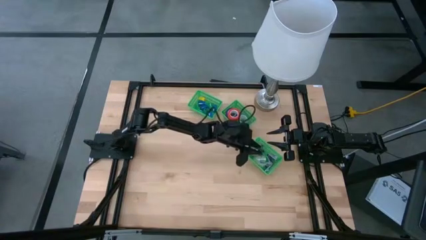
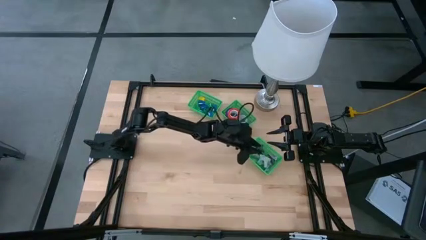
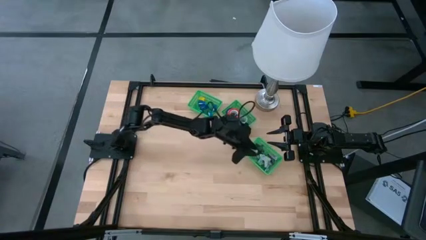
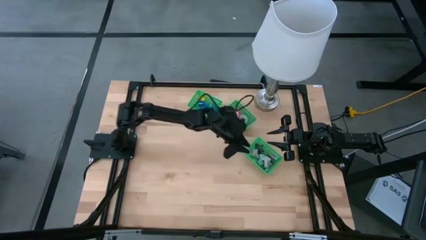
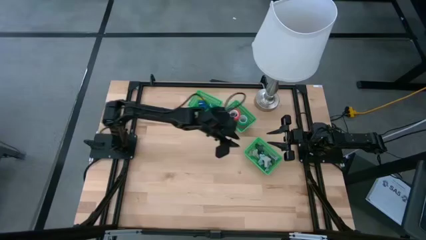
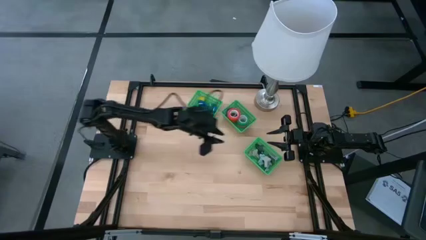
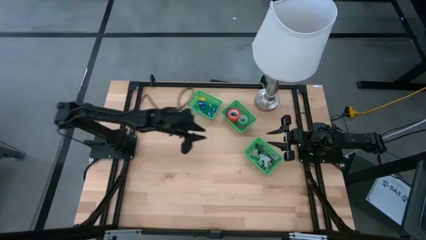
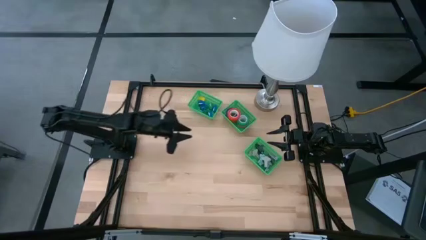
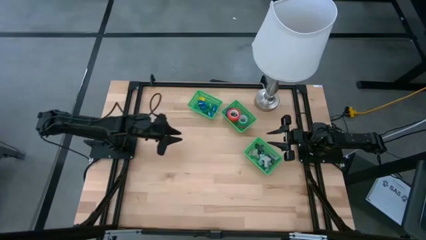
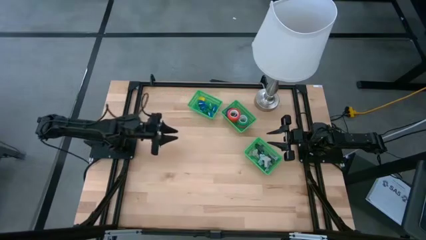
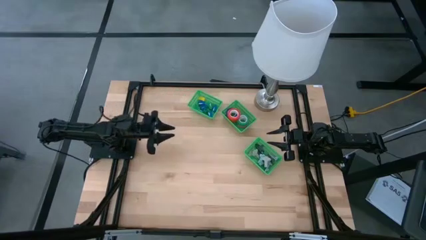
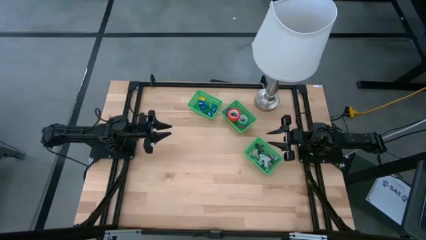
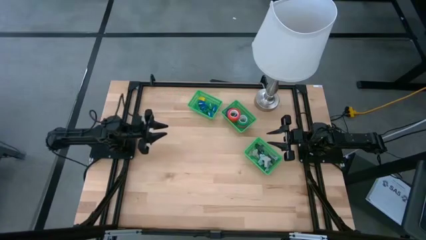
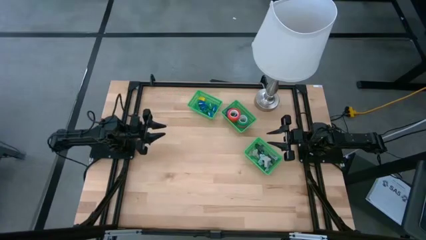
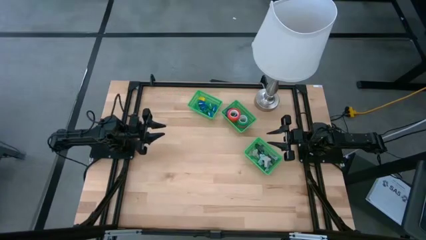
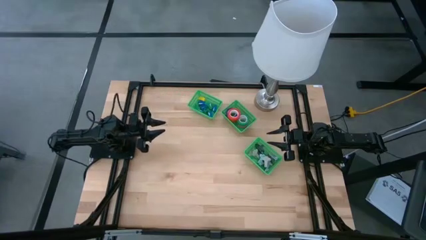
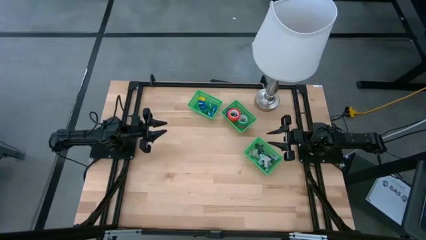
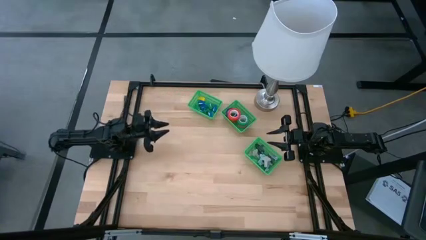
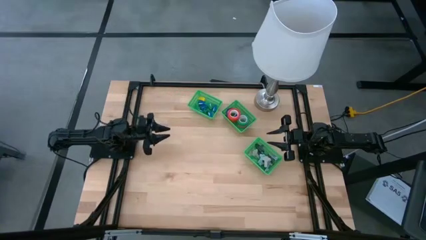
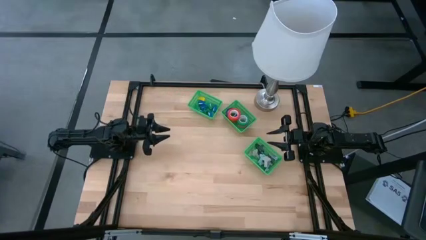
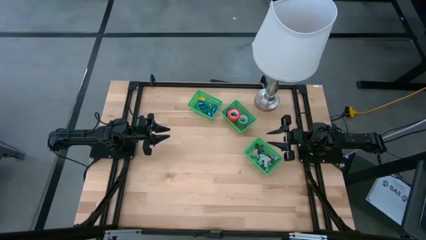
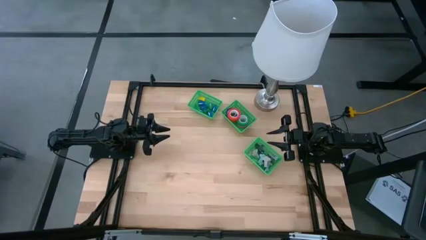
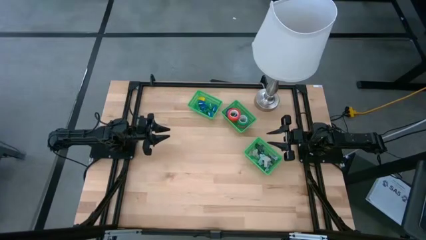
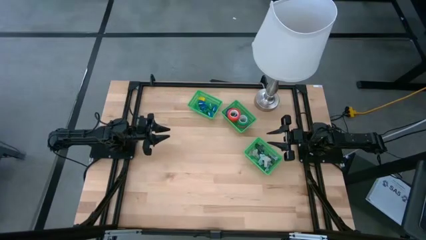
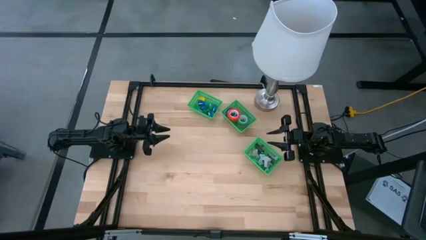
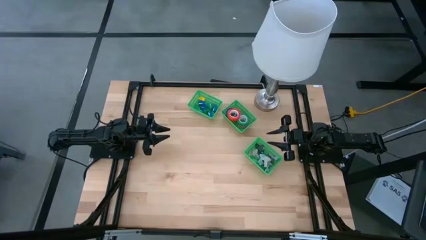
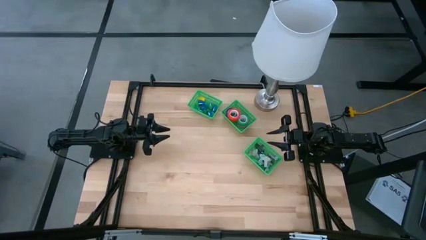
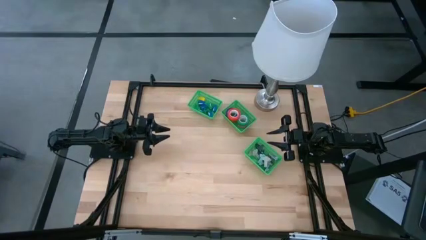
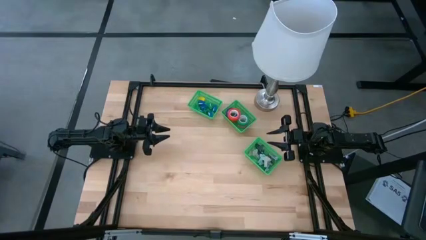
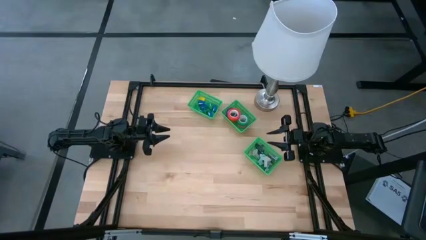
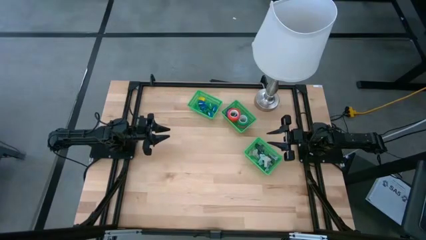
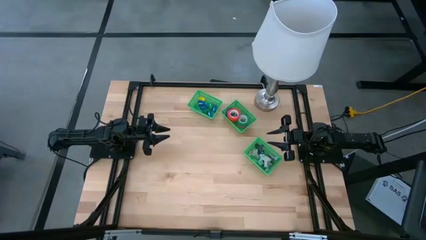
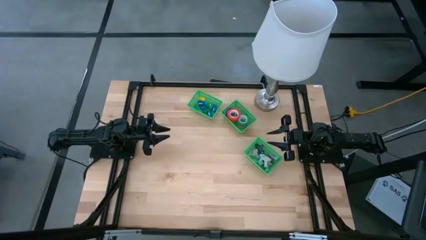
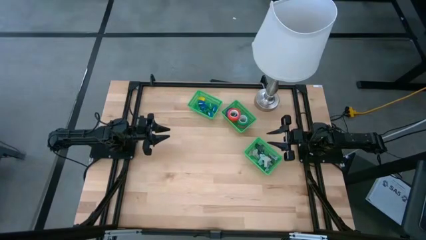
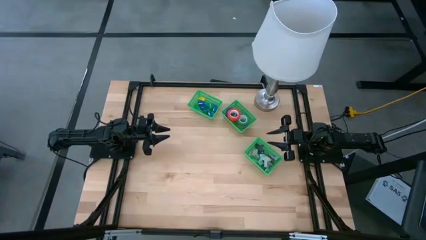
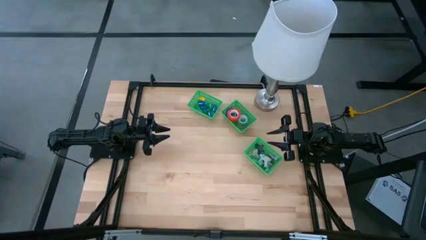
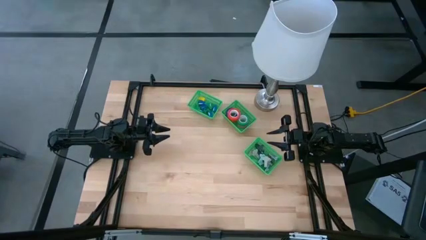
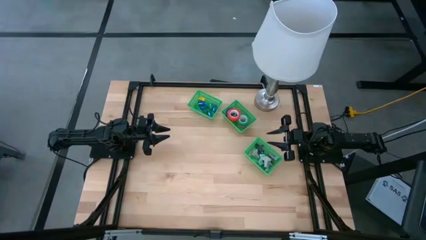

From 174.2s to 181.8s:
Task: Pick and place Stapler, Stapler remover, tape
Return to Home Position

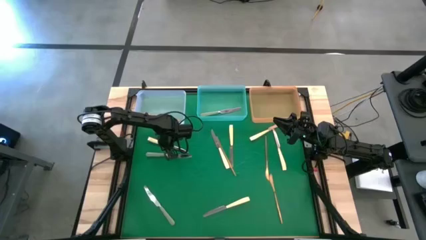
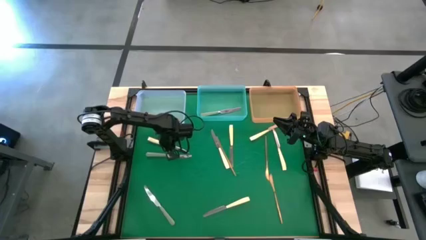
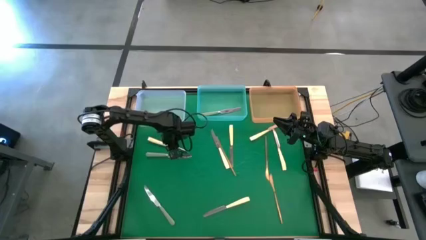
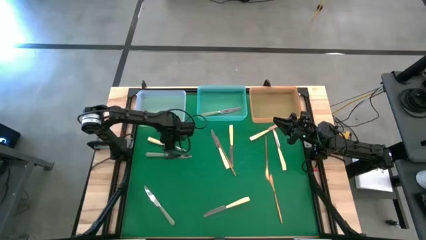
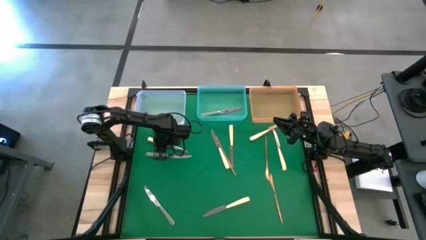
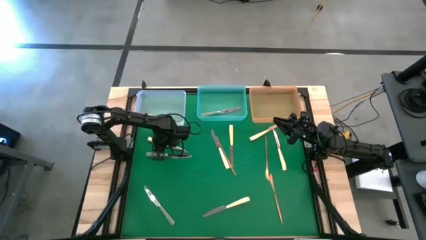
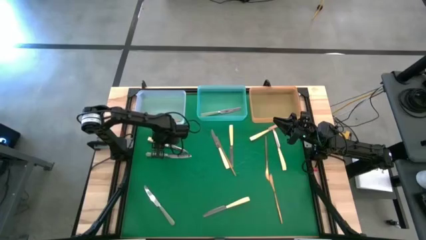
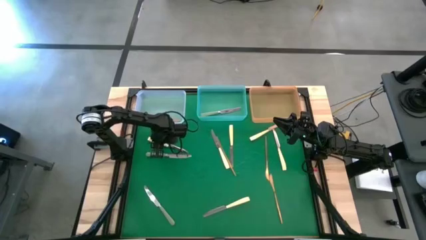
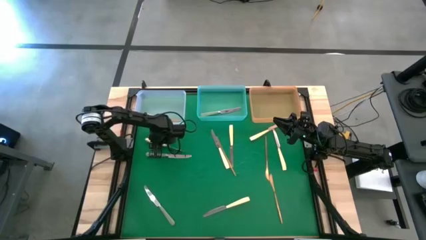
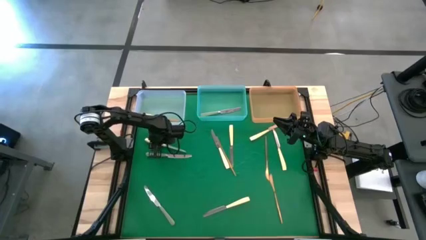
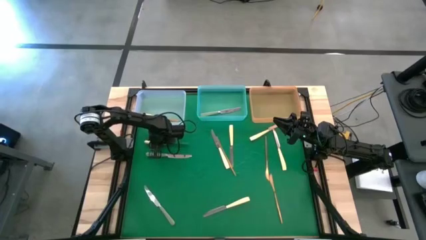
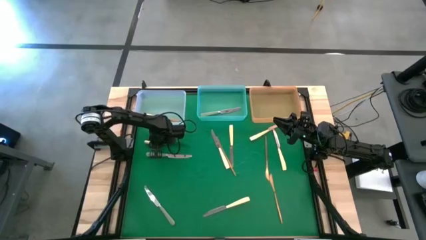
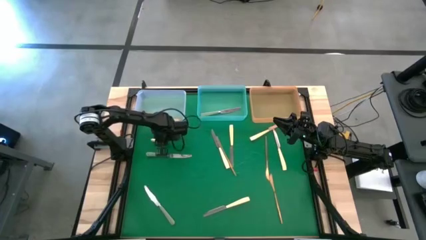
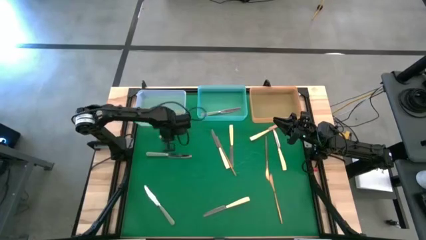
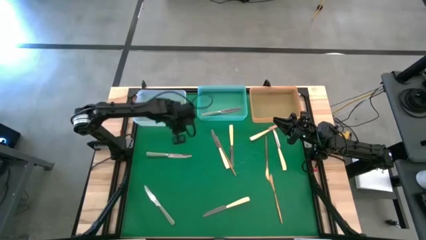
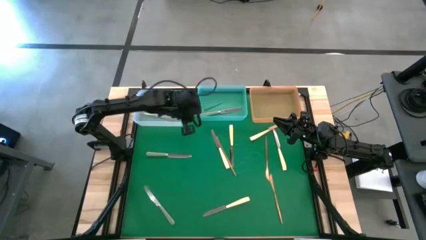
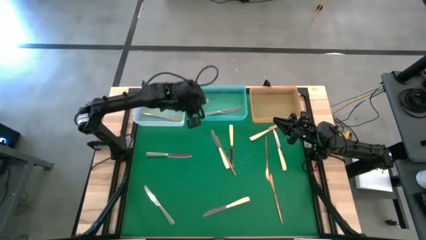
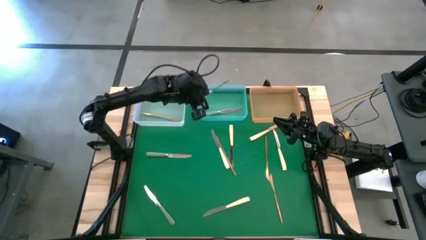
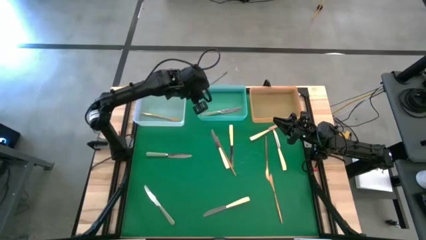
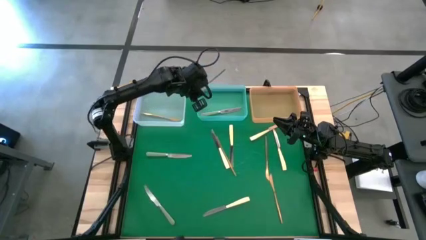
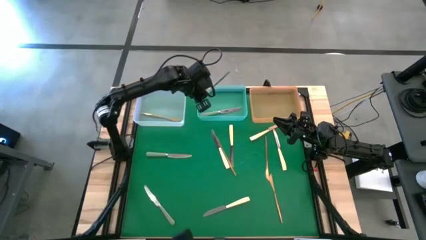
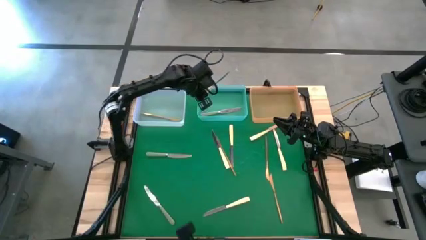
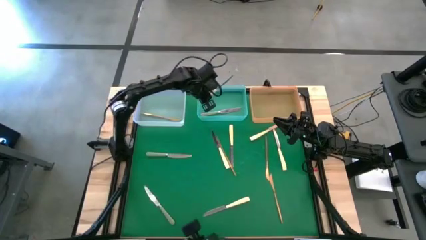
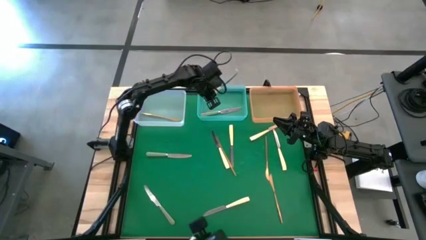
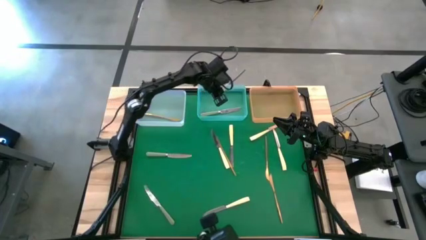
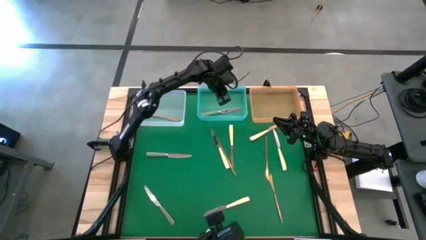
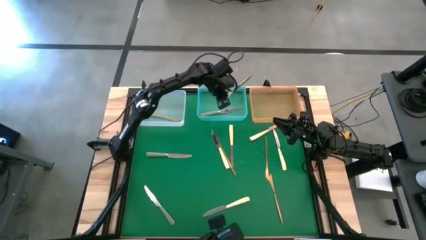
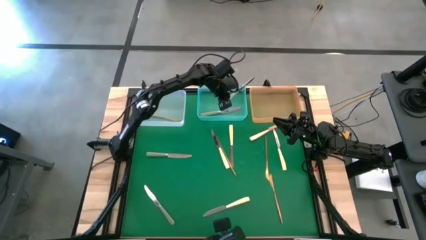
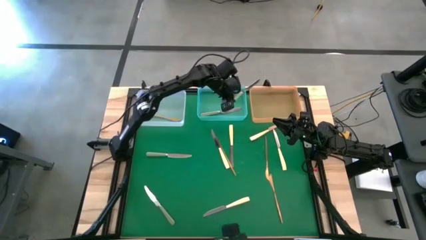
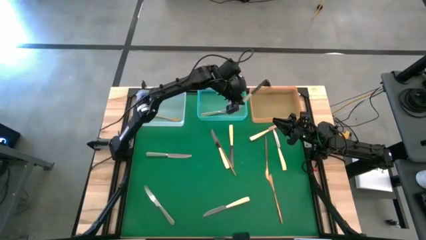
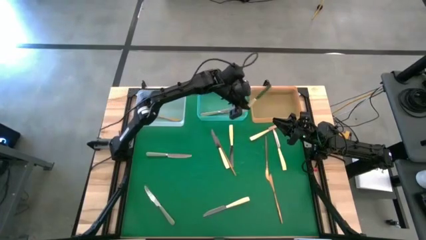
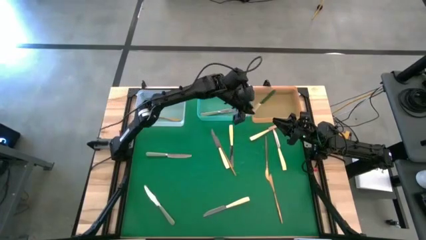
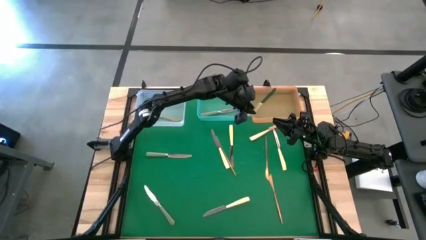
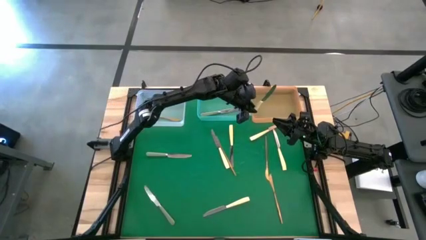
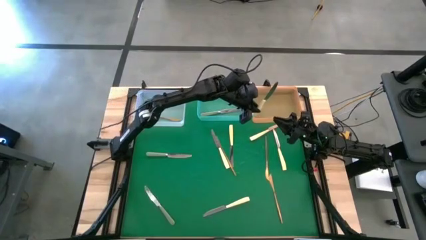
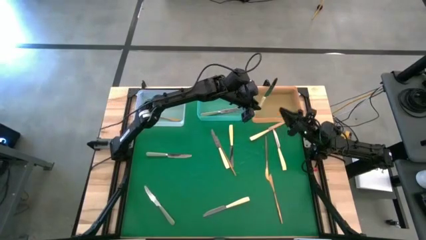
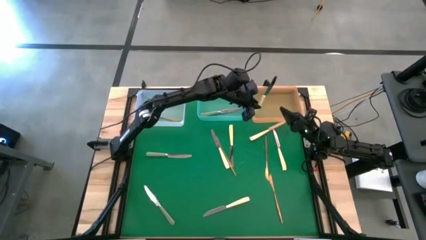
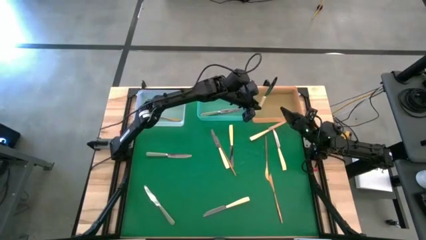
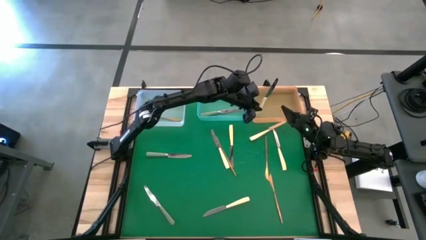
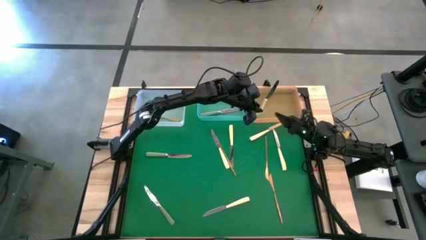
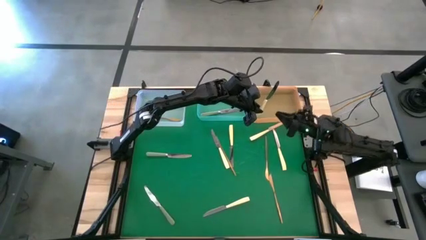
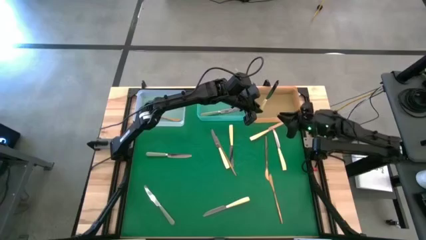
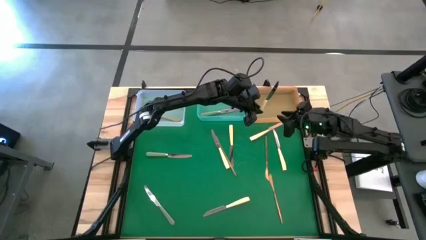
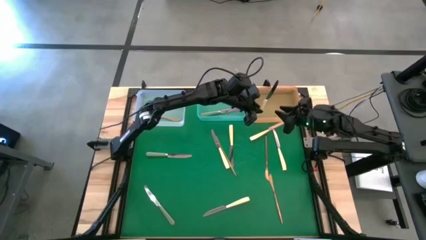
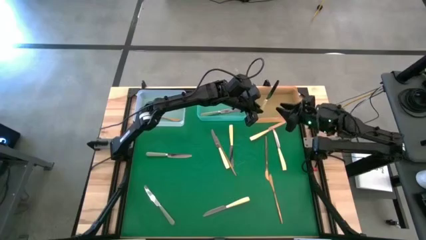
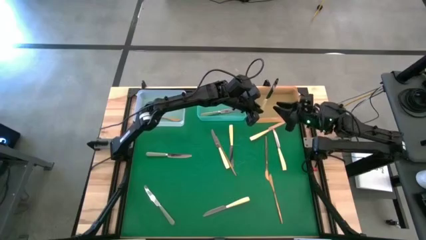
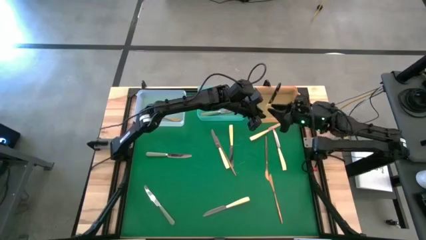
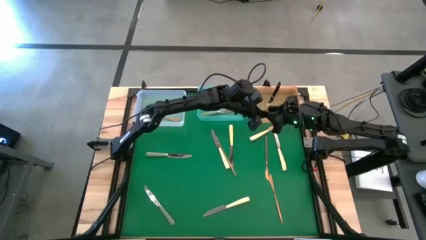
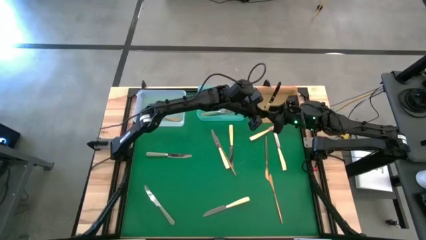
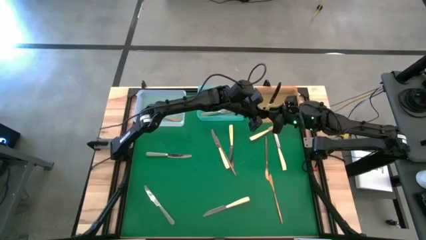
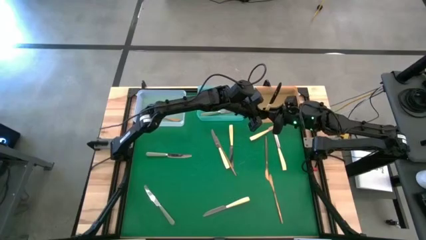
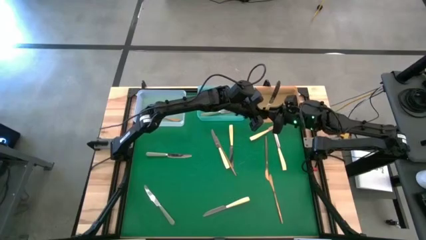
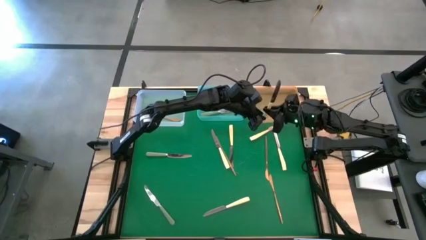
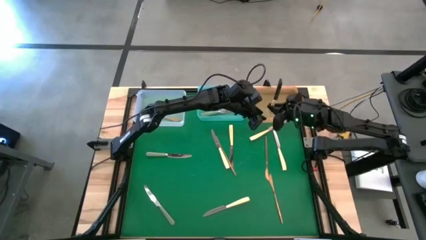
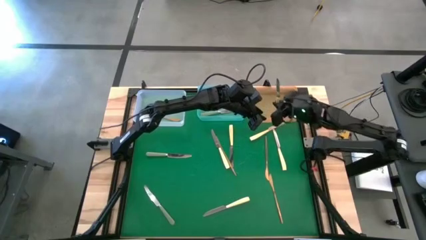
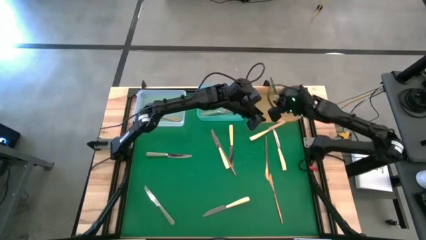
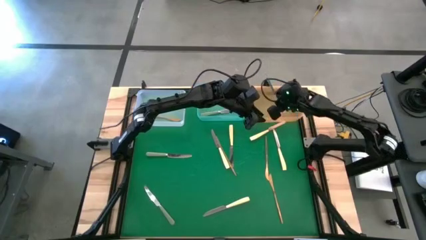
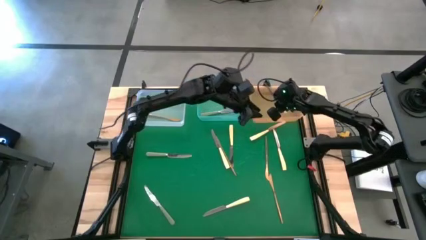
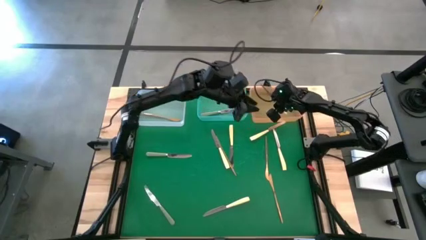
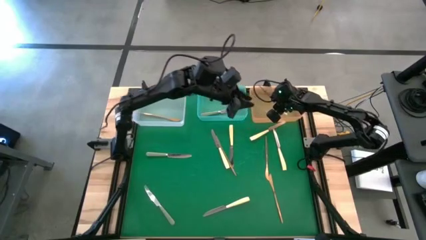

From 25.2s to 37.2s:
Task: Sort silverware by color (type)
Put the yellow table knife into the orange bin
